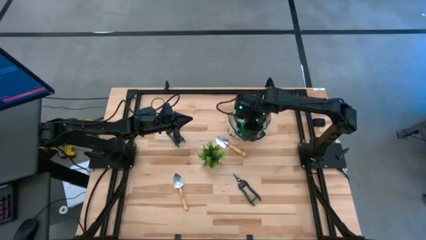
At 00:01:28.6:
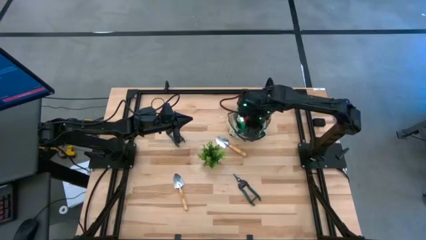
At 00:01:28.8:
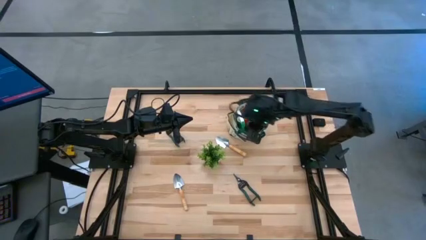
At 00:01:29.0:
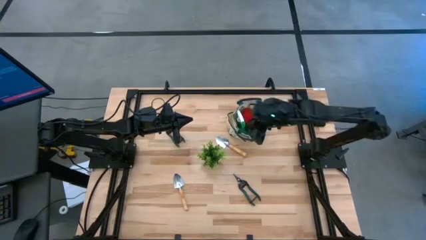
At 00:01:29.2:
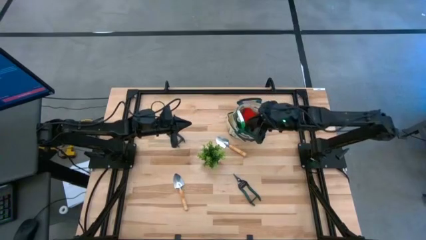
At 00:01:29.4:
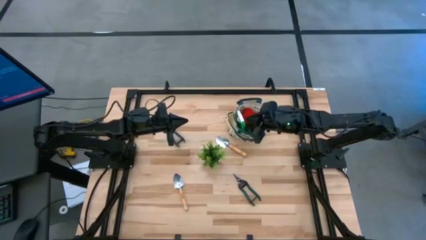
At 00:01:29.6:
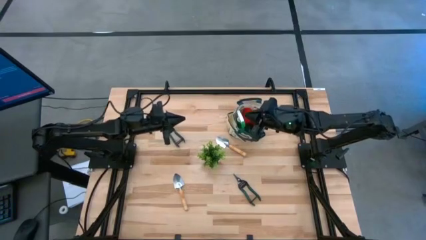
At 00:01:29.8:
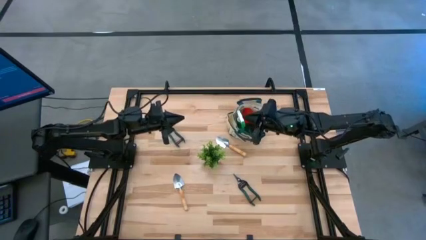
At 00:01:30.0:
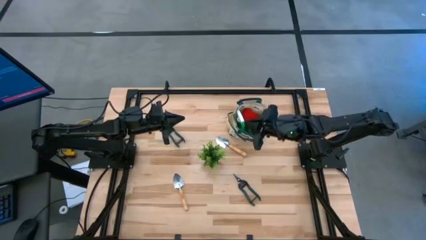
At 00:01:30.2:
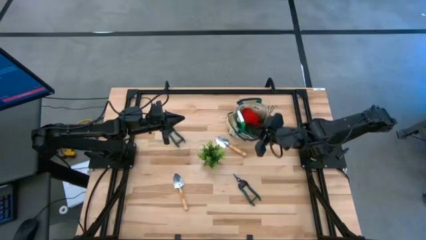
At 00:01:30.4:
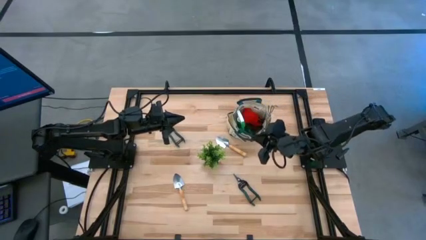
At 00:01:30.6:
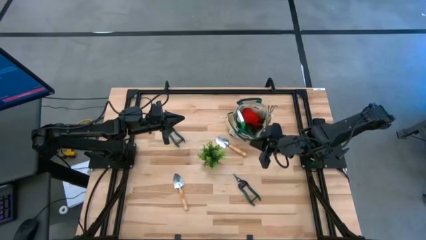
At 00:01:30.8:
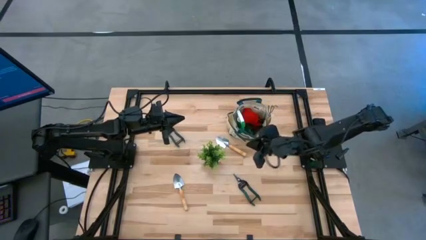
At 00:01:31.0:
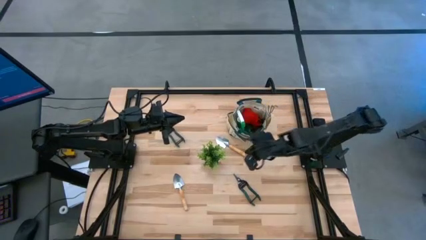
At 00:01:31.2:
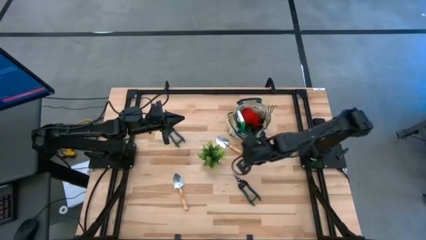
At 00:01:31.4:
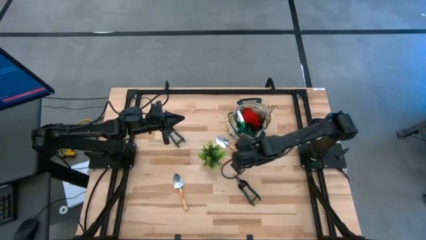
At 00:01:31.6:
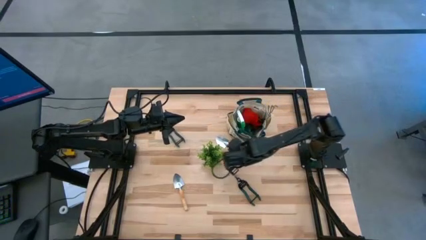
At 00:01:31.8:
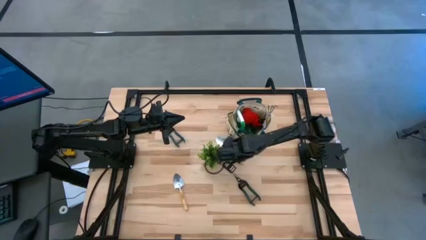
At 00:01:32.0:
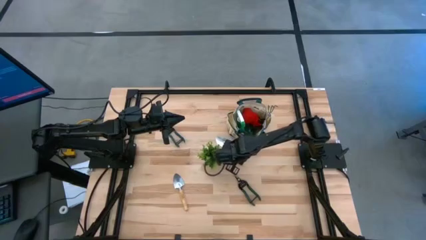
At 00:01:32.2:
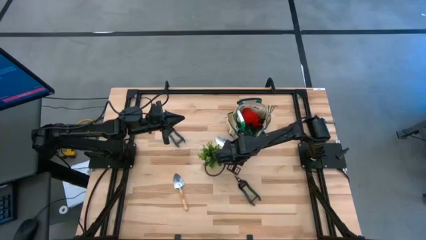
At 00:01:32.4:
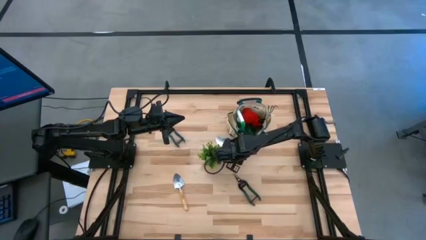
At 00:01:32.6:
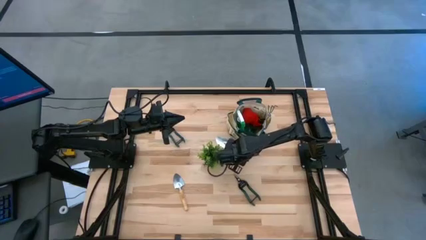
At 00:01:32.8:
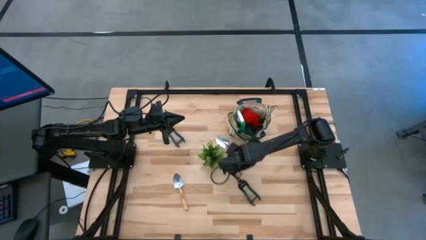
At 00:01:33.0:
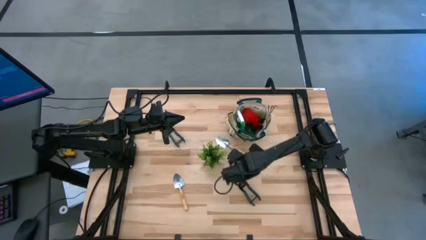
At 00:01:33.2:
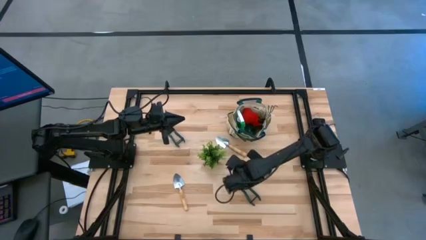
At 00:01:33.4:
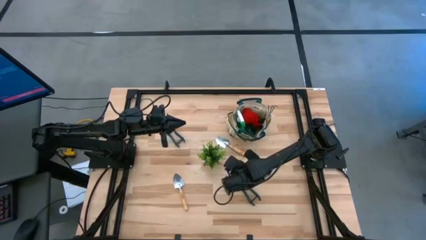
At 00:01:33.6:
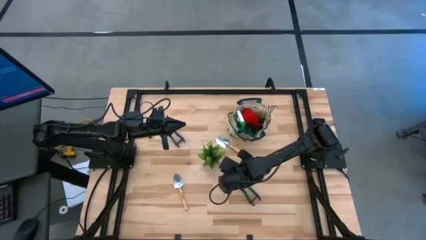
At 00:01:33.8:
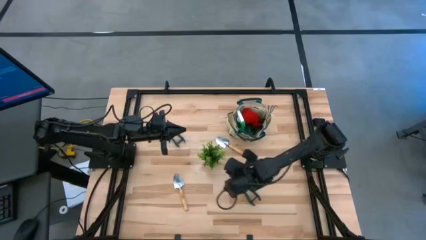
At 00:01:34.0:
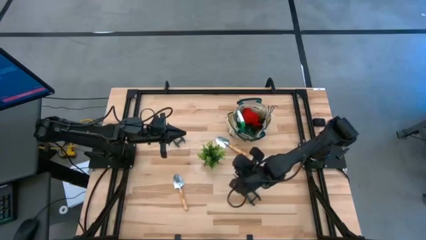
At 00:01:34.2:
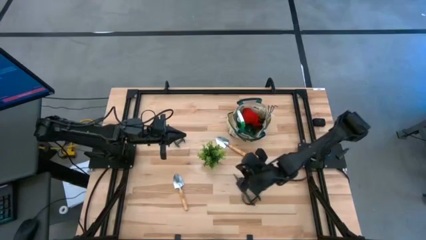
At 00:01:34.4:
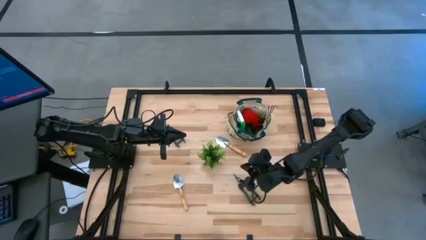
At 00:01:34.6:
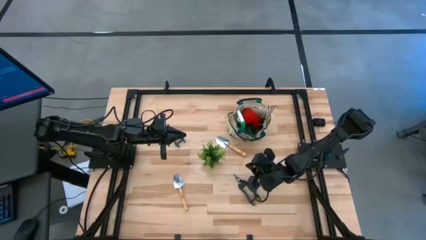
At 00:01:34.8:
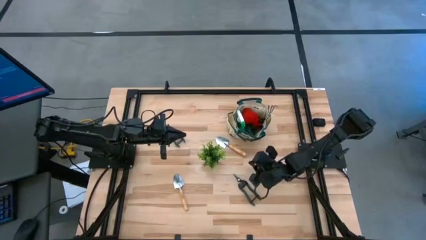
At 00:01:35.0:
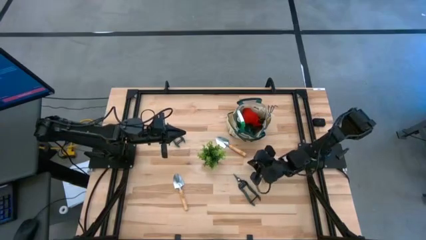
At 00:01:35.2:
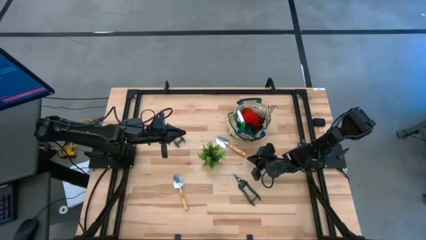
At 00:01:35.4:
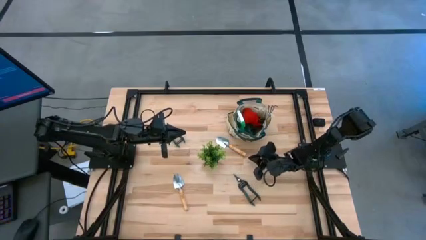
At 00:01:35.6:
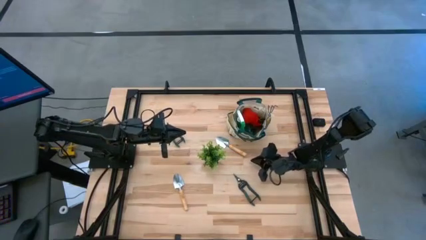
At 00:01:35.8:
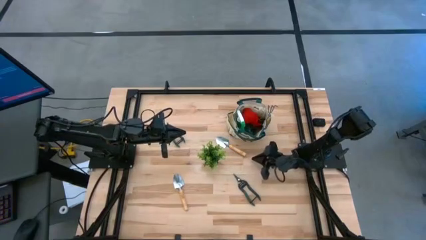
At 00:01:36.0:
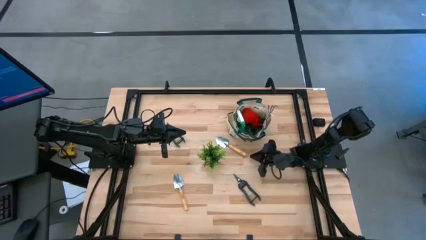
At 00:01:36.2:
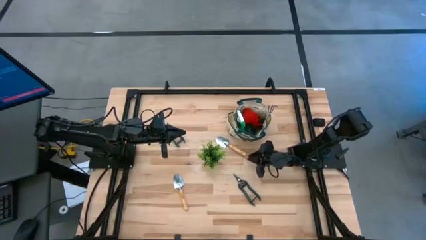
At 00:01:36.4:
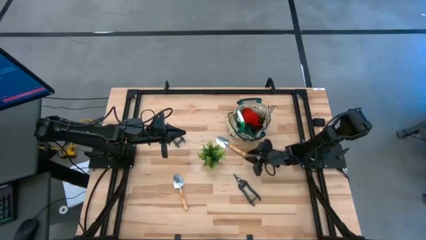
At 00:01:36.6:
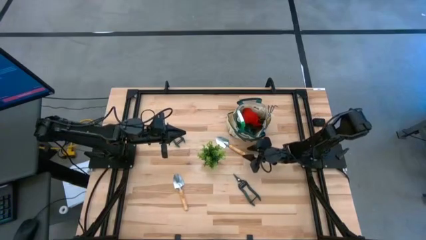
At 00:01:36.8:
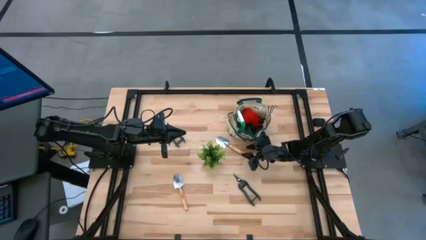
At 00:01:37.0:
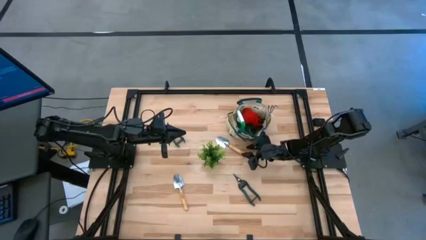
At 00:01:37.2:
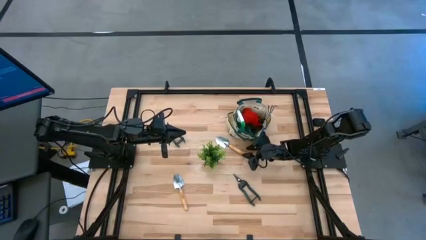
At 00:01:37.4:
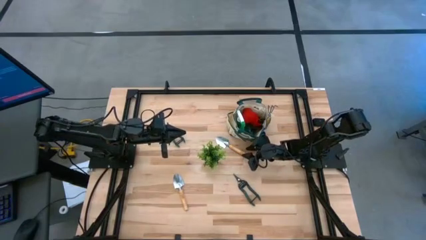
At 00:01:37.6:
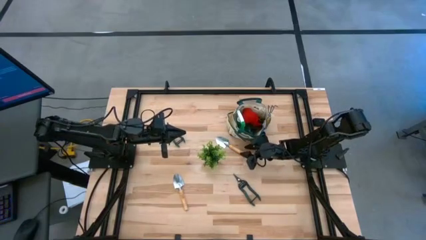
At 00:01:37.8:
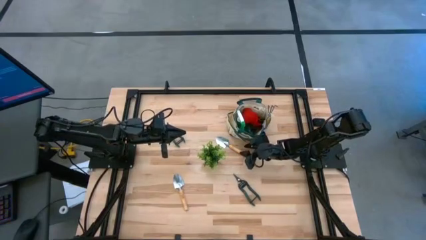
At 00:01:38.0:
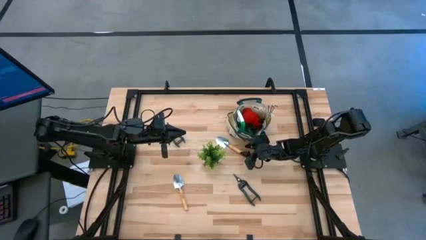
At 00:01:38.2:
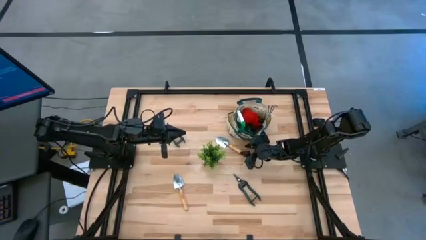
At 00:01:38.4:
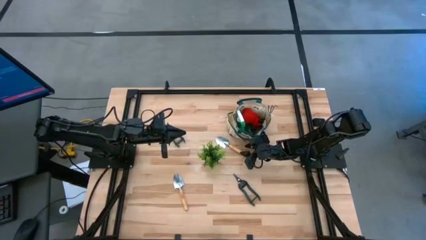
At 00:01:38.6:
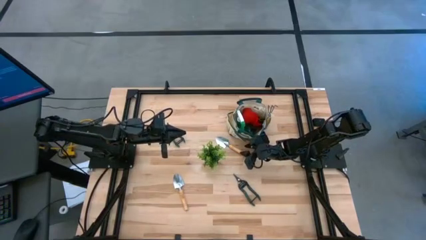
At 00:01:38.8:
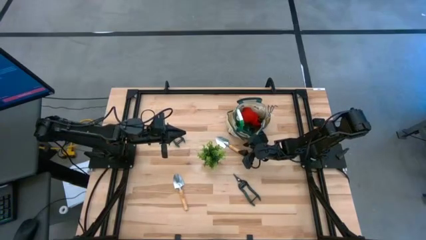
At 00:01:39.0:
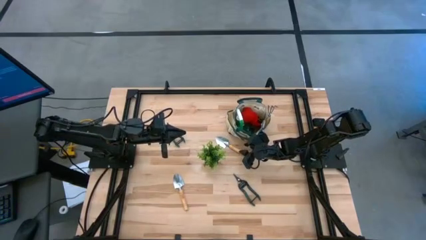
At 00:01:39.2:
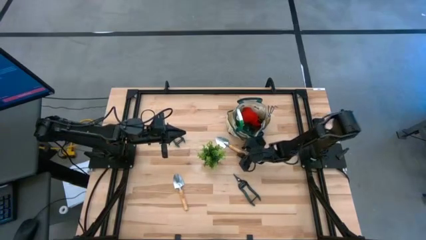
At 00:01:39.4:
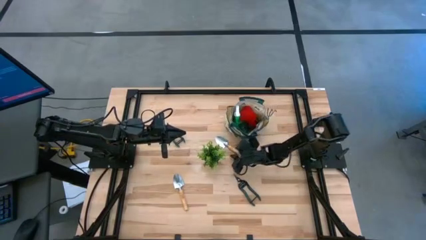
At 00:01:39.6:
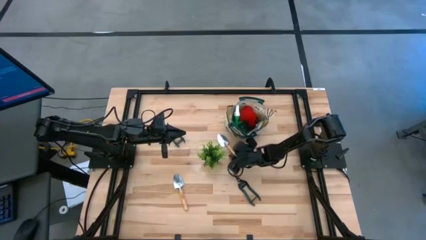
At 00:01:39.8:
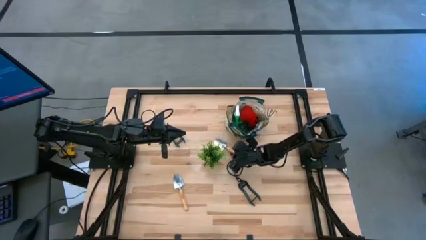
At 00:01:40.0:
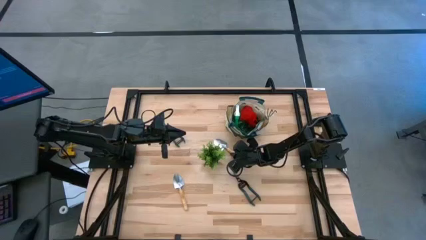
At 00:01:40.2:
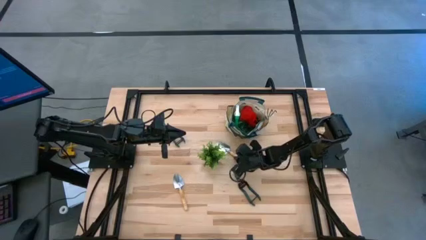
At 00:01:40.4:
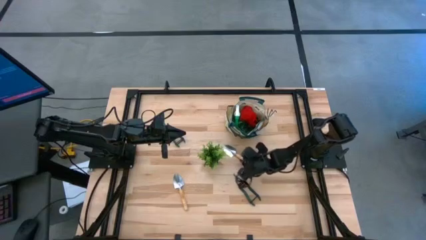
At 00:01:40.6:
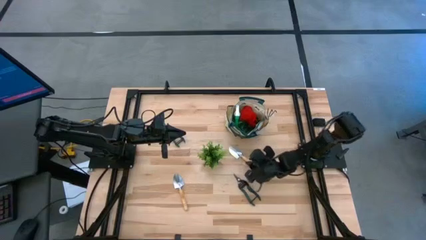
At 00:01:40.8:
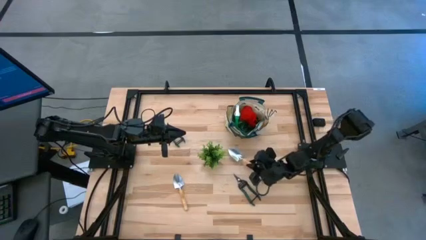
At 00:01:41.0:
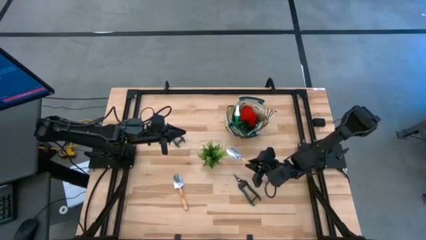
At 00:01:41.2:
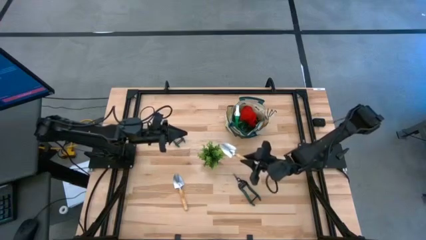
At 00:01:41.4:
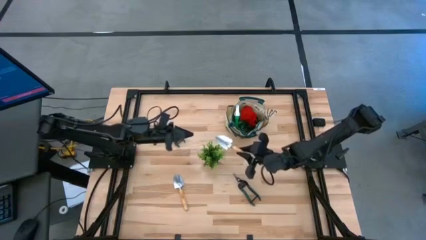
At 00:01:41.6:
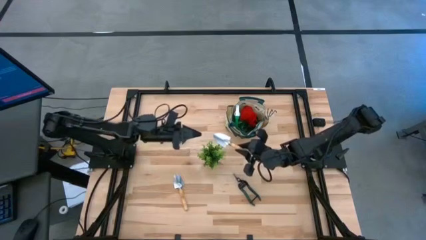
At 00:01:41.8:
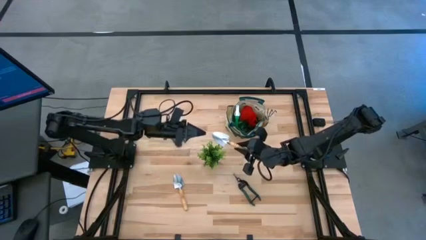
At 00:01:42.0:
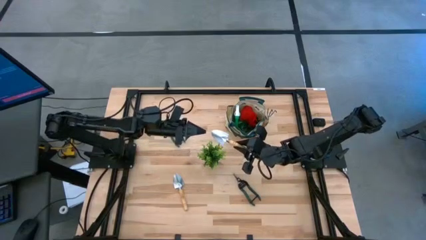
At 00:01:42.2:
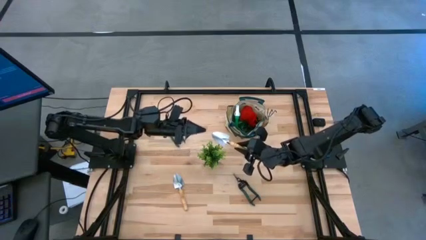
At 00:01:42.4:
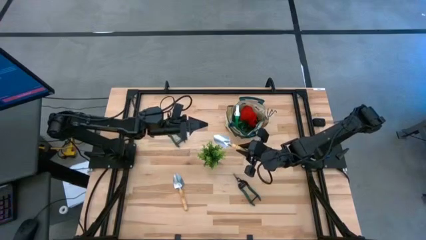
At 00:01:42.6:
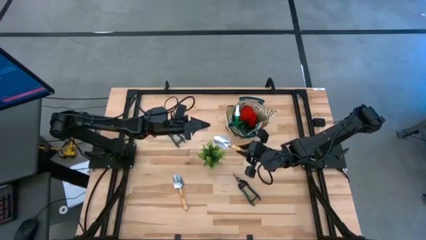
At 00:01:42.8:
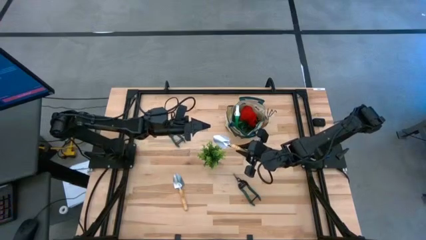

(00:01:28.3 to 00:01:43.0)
Task: Pick & Place Garden tools in Gardening bag
Put the top brown trowel into the brown gardening bag

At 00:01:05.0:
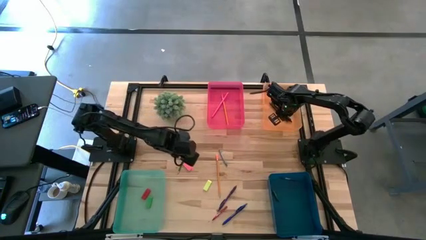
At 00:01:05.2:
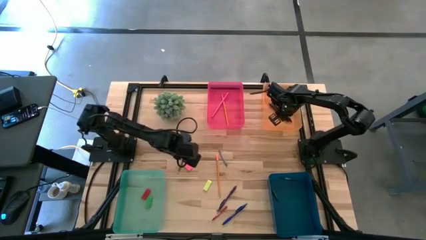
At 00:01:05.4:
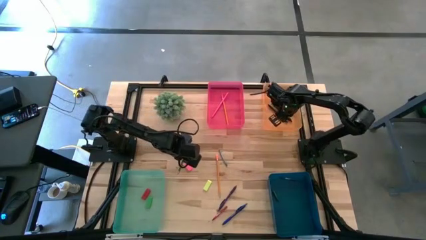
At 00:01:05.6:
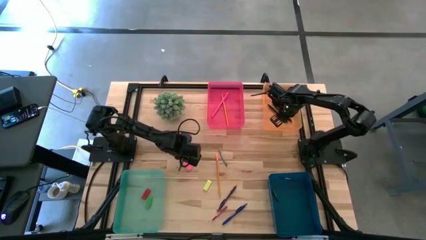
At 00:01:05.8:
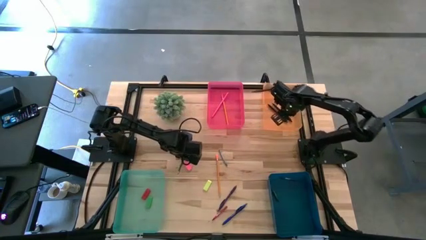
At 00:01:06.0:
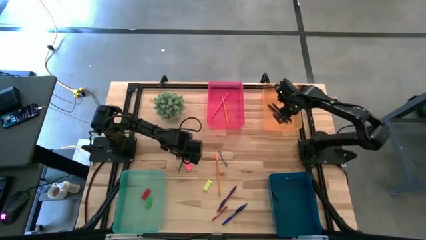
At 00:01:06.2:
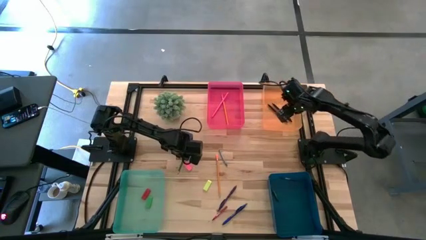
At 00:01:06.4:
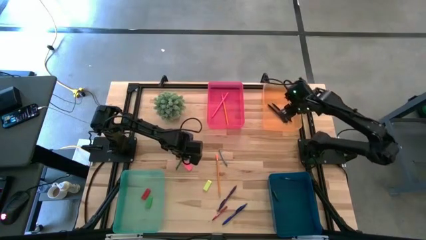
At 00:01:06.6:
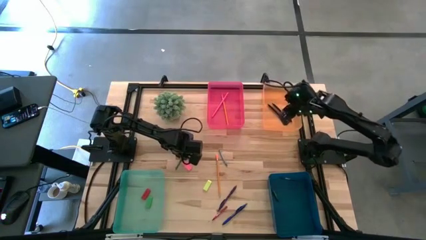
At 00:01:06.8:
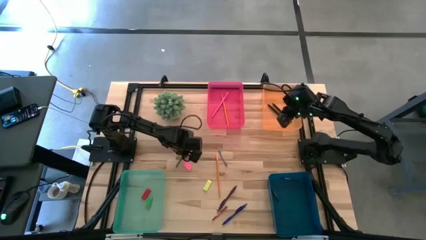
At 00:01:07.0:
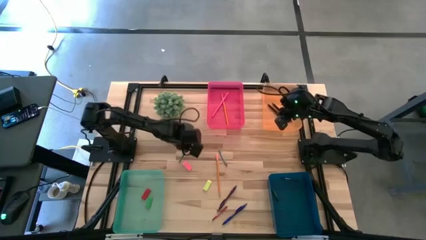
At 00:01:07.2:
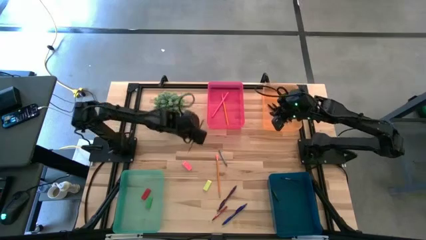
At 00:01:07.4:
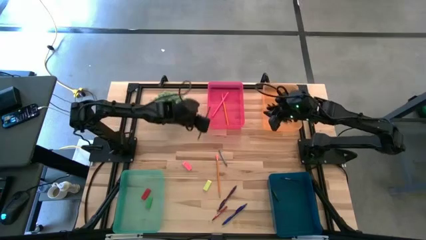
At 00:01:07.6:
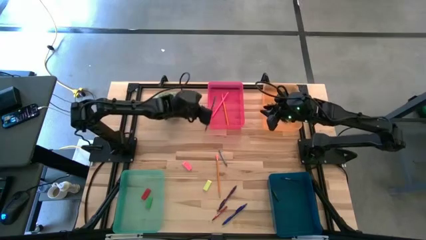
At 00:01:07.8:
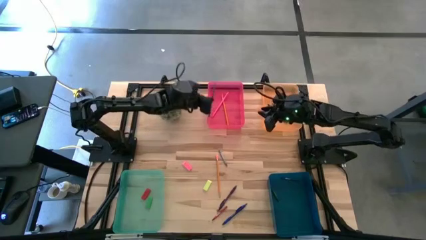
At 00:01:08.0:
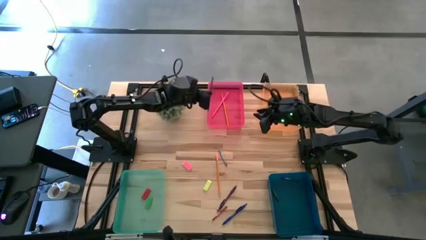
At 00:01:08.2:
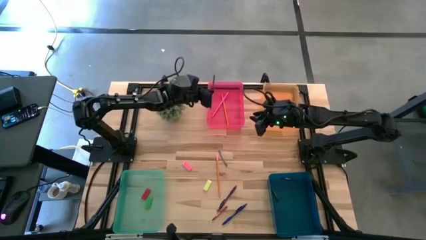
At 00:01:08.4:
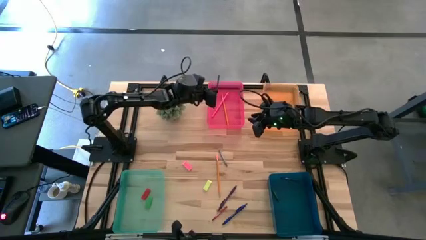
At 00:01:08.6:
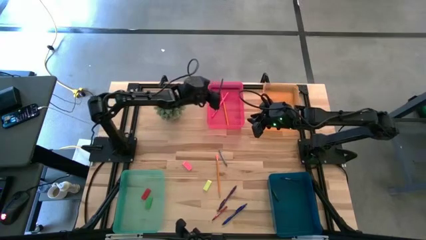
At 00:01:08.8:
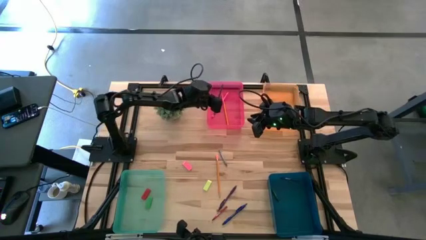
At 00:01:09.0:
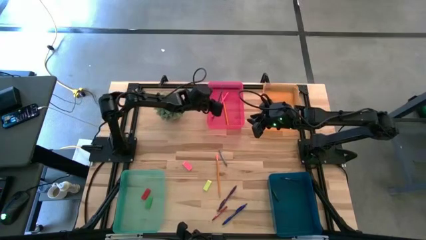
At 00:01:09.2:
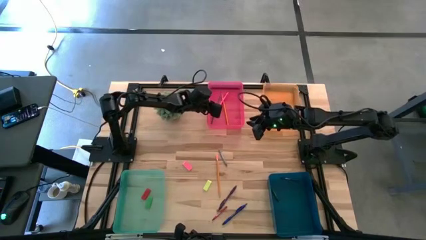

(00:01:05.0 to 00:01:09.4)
Task: Sort crayons/erasers/pens/pencils in bins
Put the green pencil into the pink bin
